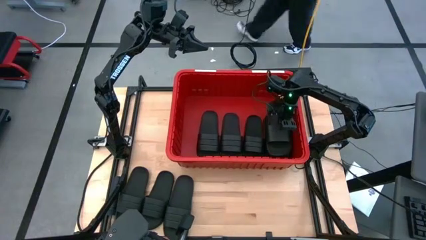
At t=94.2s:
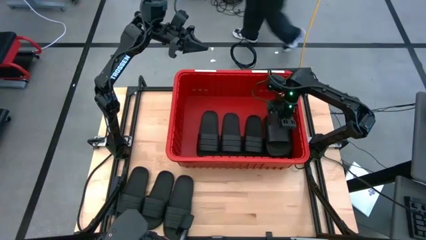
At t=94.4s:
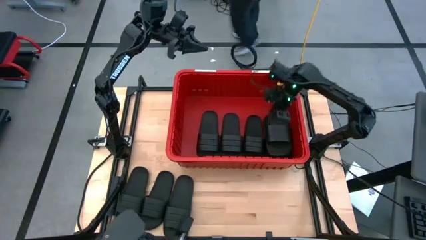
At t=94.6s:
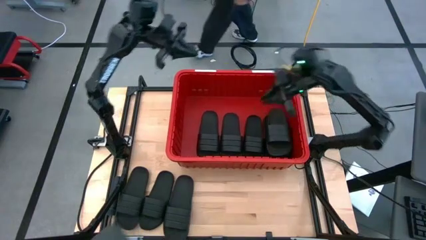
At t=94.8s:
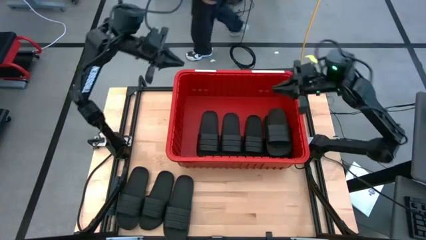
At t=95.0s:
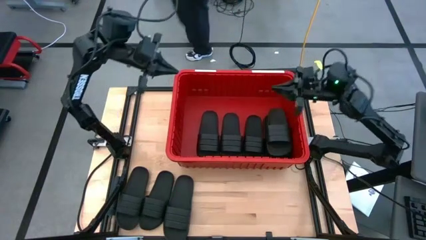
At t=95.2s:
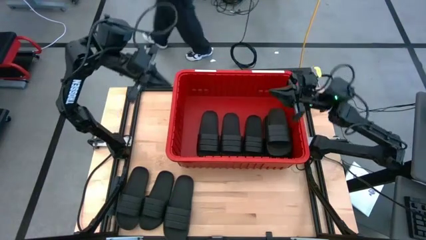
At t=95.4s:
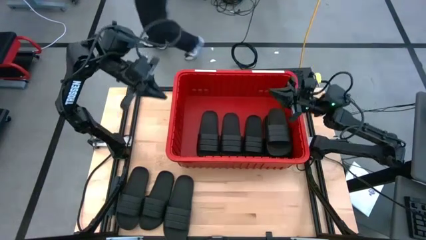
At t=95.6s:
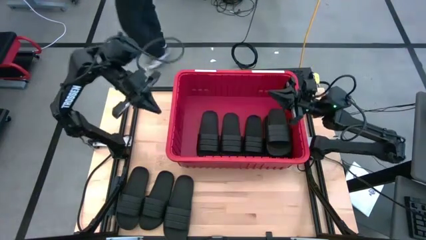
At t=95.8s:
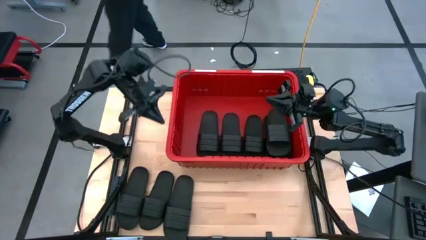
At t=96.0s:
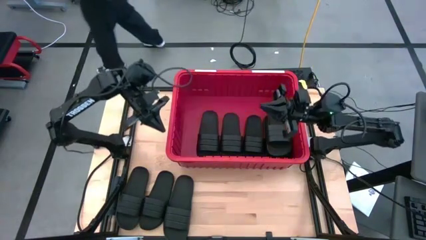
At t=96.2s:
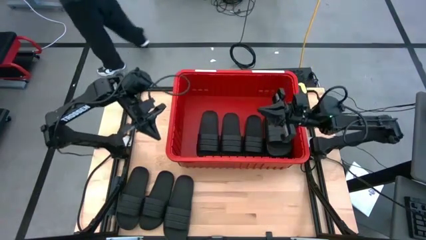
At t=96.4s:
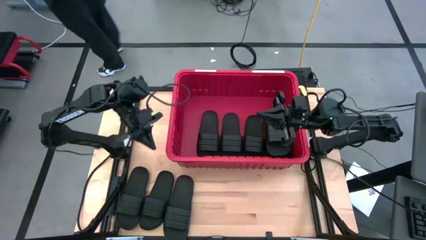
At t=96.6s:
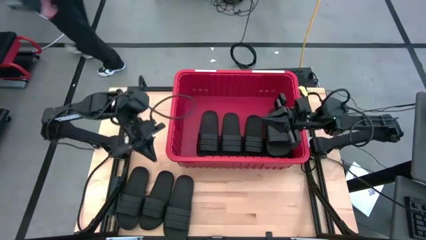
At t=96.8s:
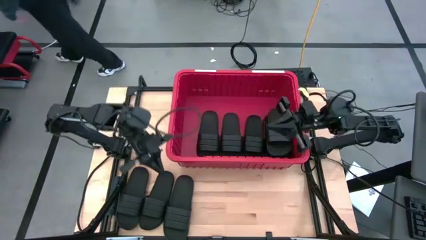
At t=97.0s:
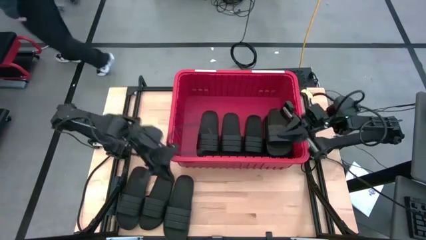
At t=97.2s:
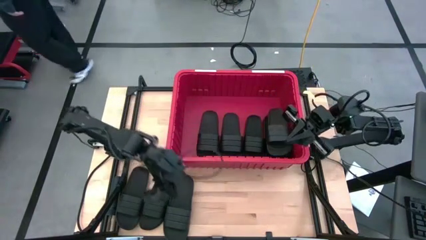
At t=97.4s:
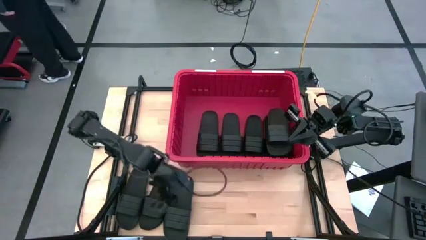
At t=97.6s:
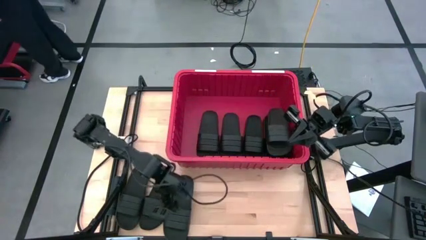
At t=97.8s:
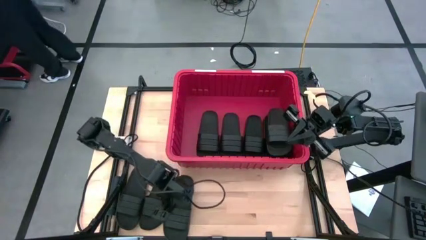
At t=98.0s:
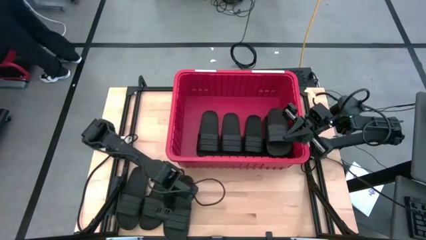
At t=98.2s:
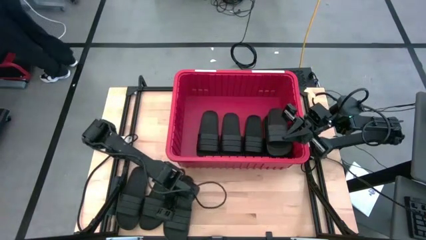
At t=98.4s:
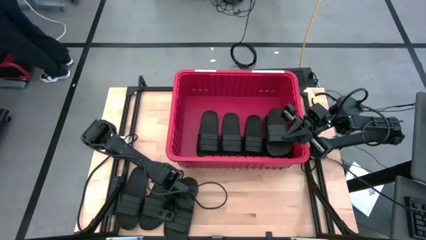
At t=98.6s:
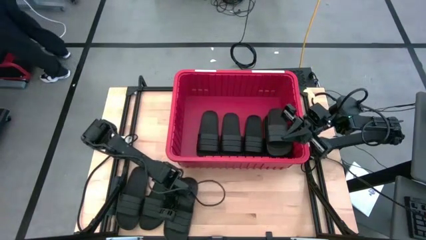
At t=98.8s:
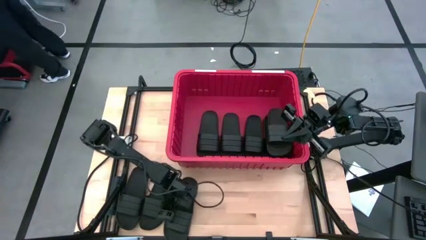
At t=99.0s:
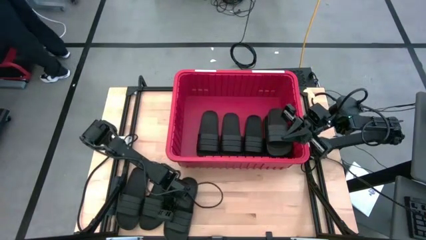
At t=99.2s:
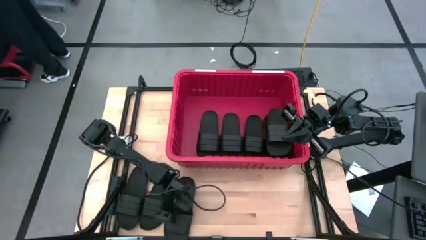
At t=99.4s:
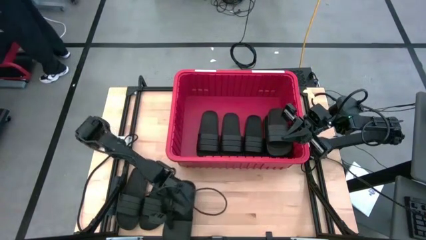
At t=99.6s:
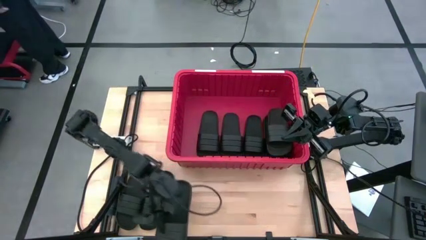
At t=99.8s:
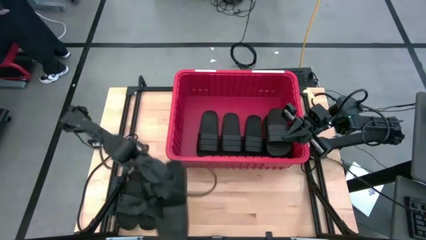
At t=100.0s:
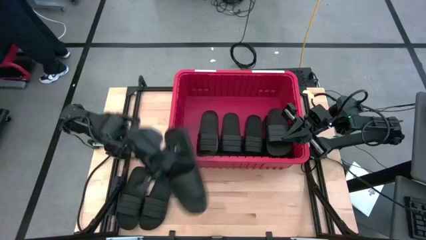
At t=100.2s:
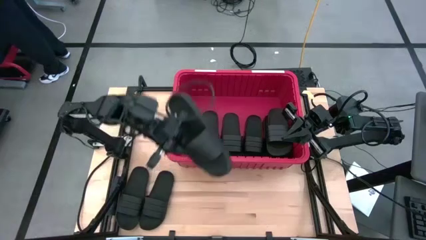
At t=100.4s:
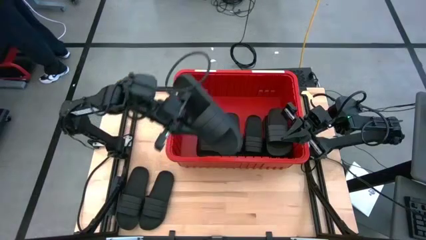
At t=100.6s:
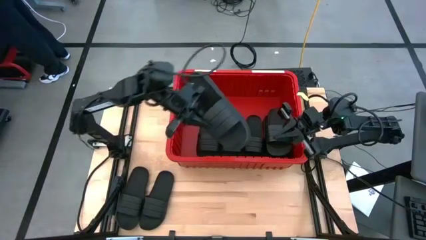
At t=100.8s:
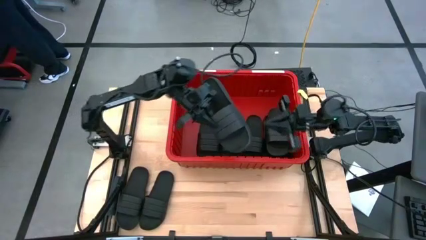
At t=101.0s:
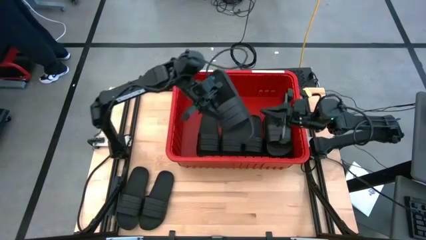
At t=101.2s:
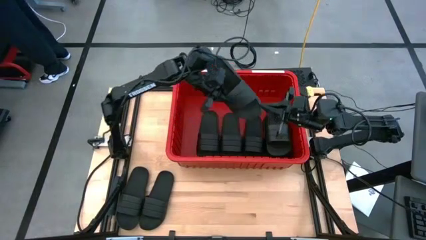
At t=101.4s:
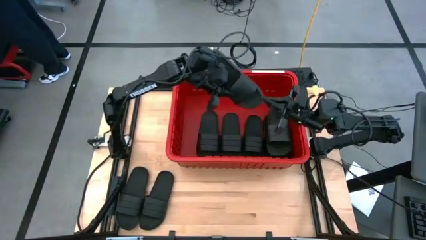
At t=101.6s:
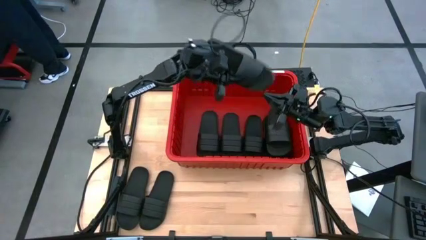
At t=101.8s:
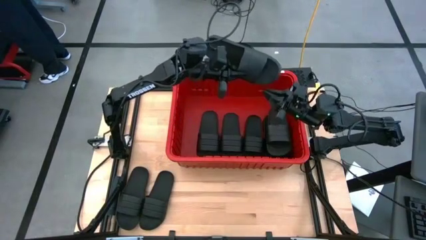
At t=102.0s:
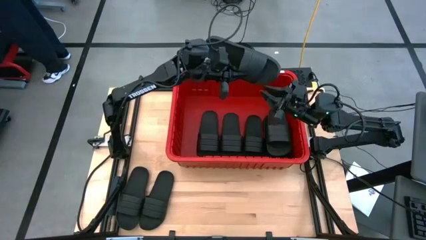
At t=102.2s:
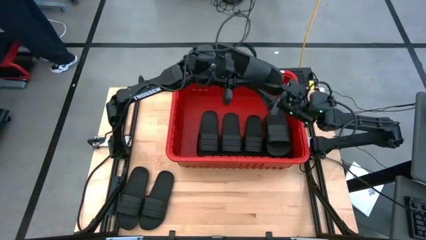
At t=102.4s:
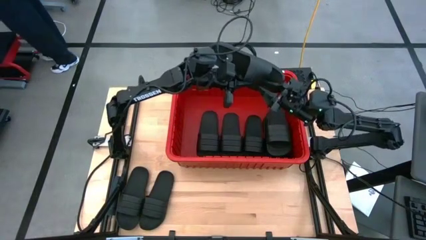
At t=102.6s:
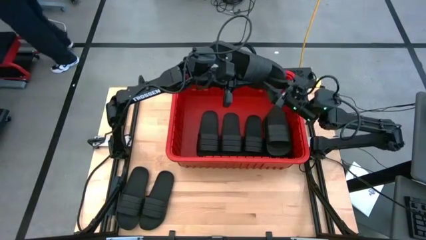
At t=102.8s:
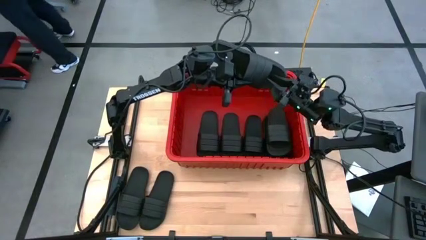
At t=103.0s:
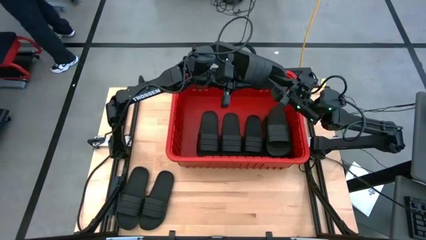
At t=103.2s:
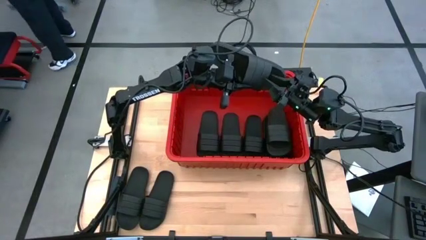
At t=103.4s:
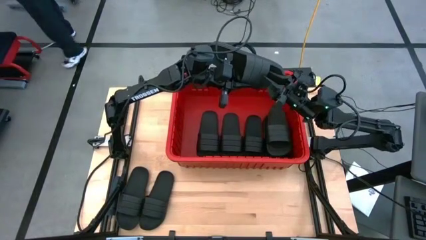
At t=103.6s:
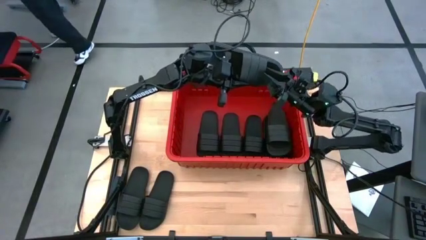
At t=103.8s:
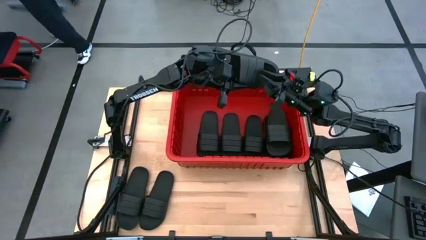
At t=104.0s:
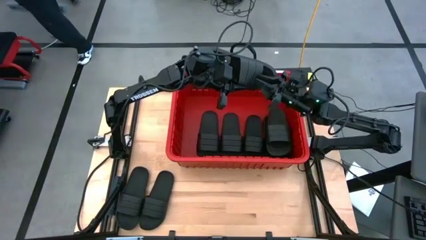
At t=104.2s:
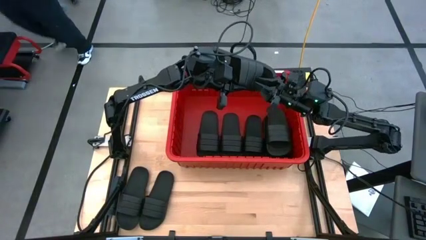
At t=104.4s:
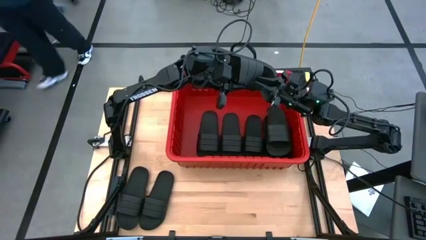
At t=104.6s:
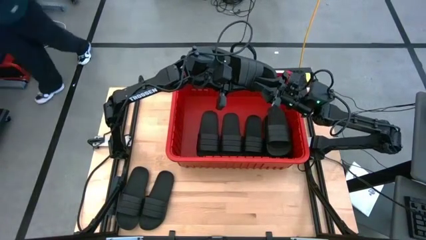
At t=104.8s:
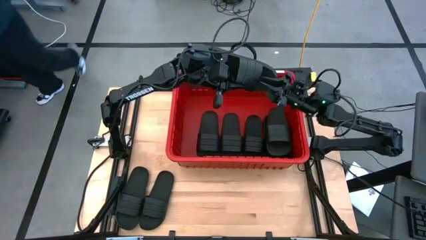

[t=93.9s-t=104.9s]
Task: Pick and place slides into bin
Put the black slide into the red bin
